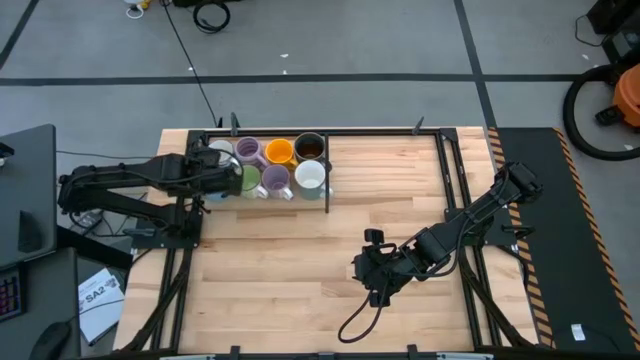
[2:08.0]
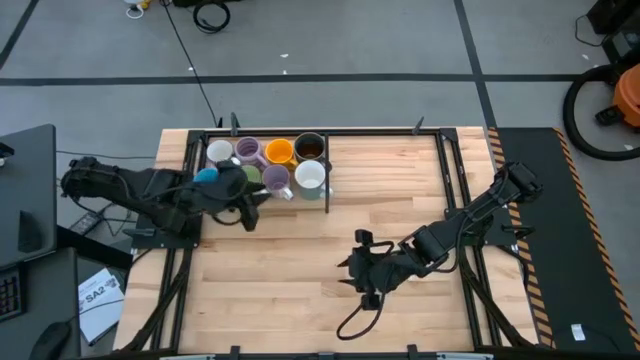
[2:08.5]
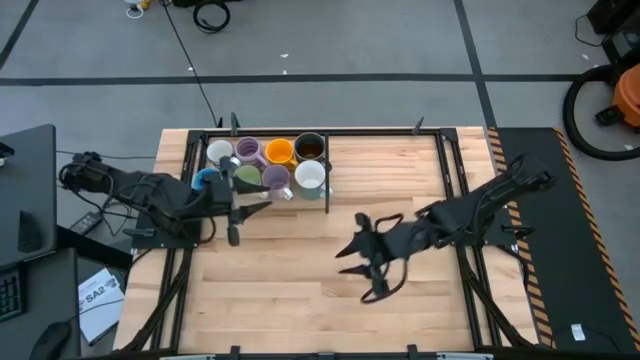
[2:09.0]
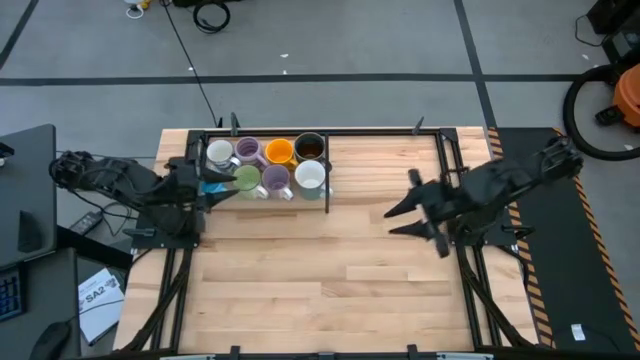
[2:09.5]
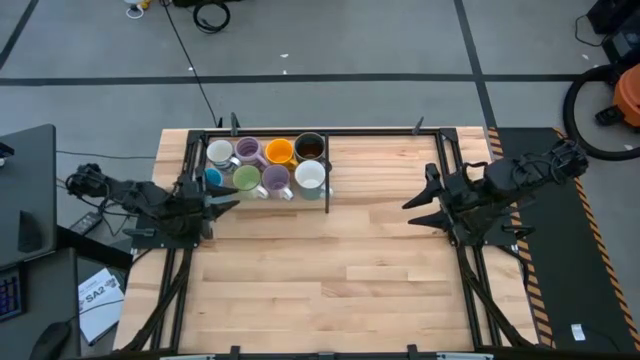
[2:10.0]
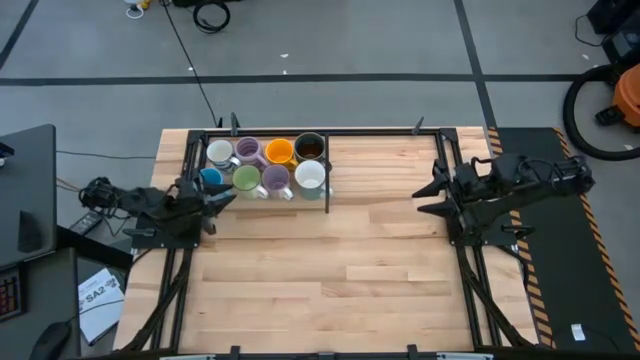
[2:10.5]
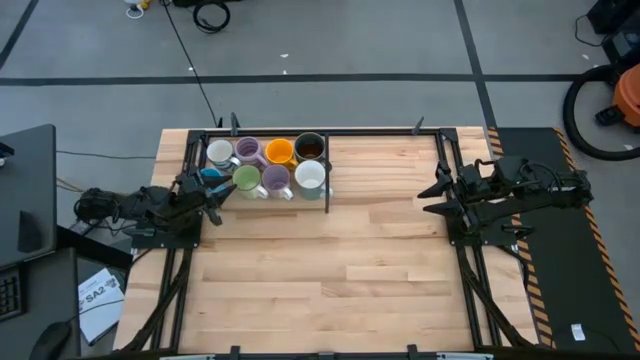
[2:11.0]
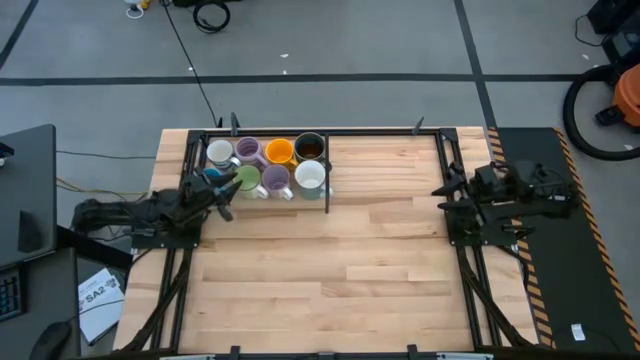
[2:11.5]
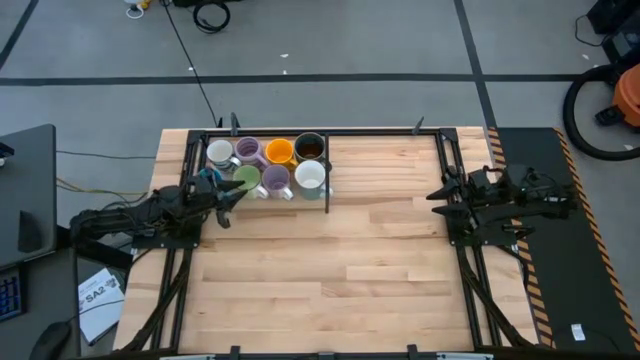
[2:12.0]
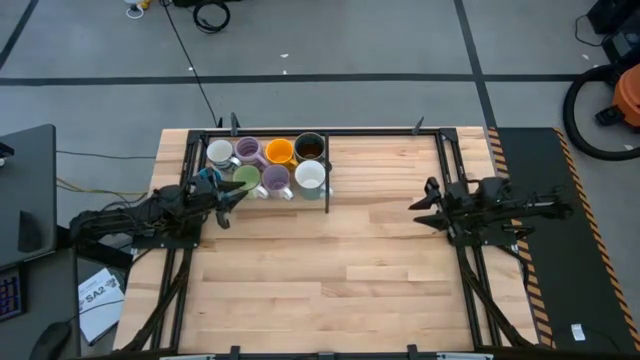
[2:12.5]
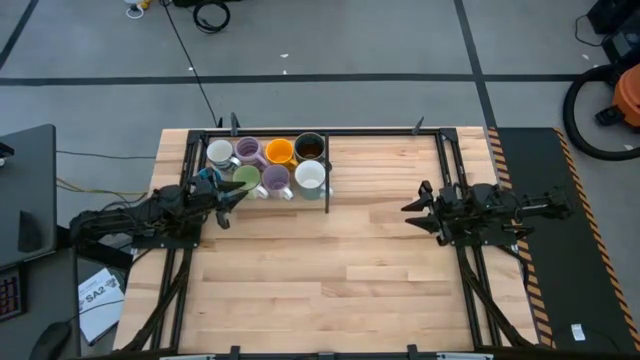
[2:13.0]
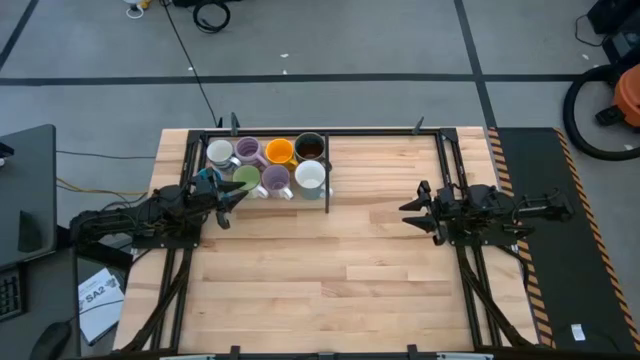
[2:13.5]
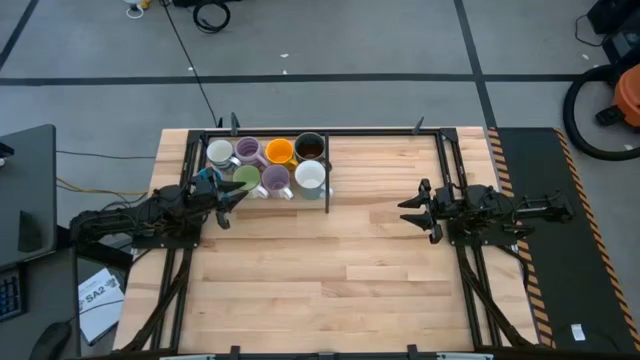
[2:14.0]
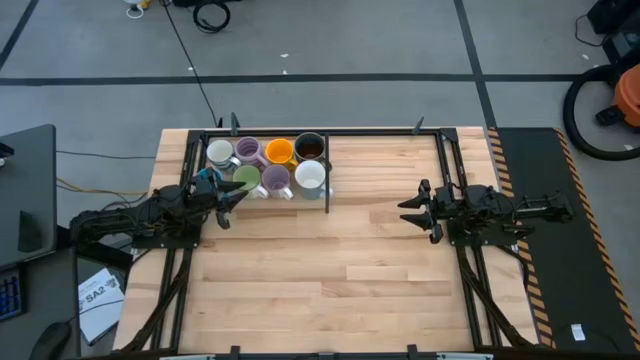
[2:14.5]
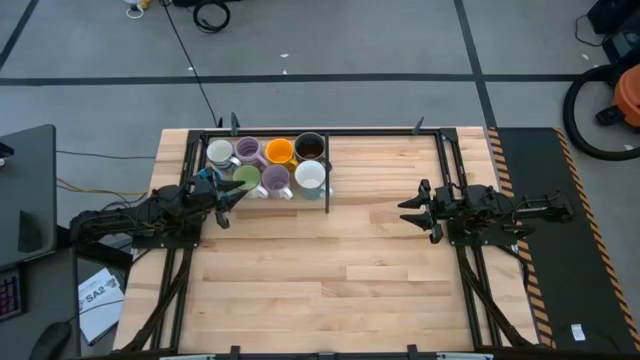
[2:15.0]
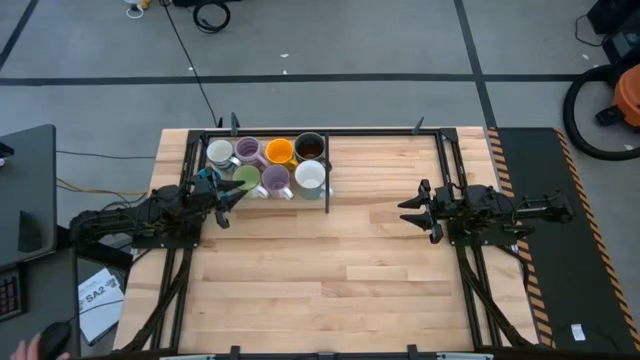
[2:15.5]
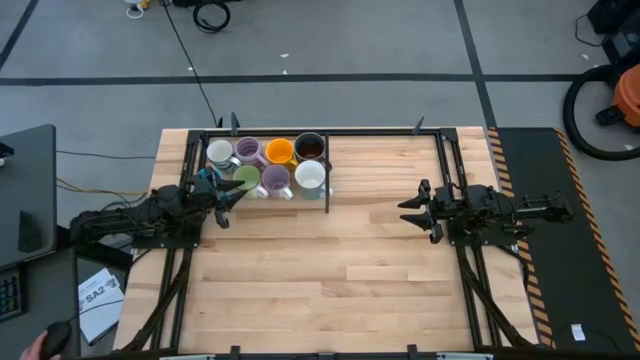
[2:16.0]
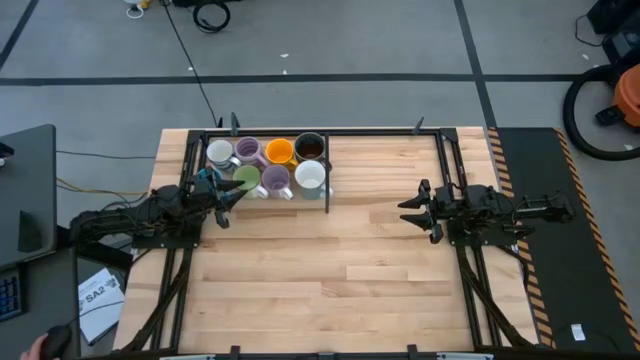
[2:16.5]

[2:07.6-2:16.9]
Task: Place coffee mugs
Return to Home Position

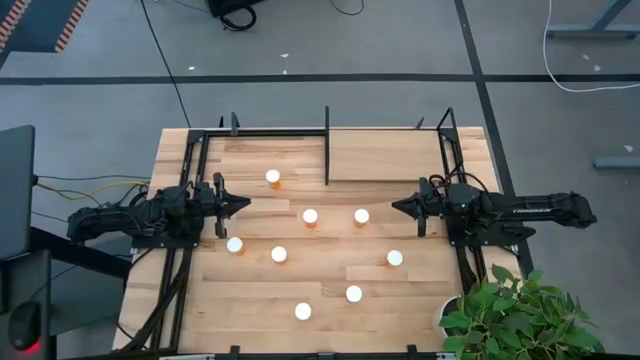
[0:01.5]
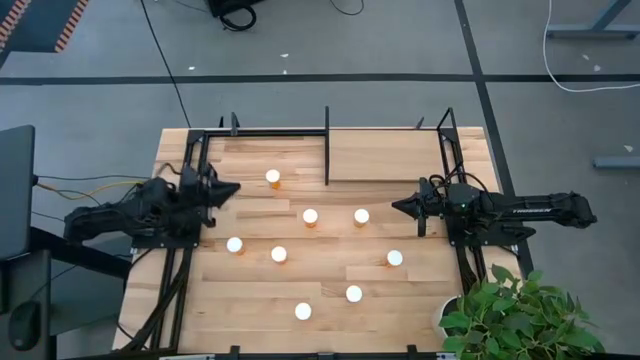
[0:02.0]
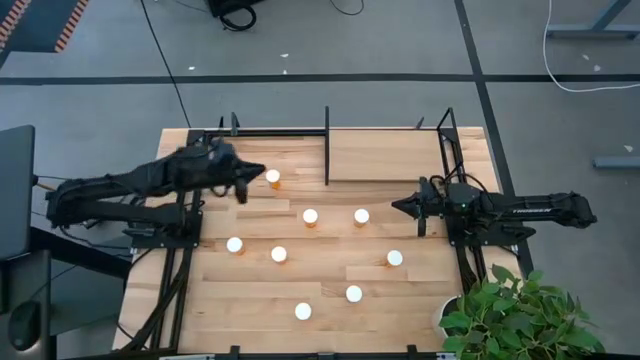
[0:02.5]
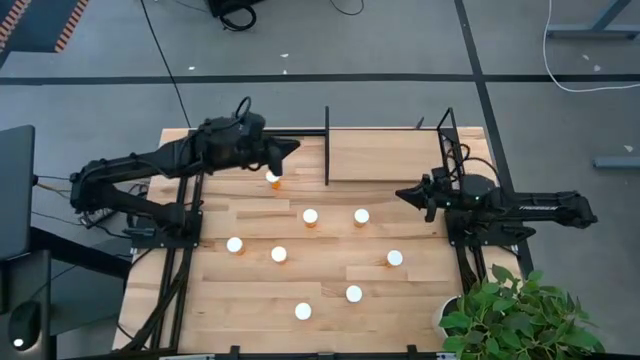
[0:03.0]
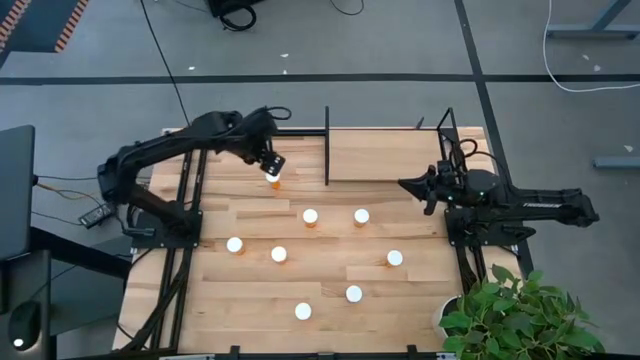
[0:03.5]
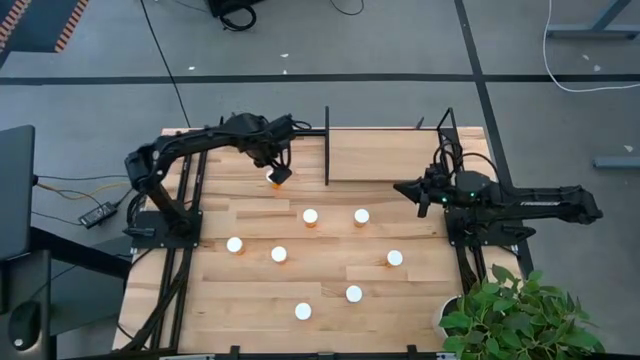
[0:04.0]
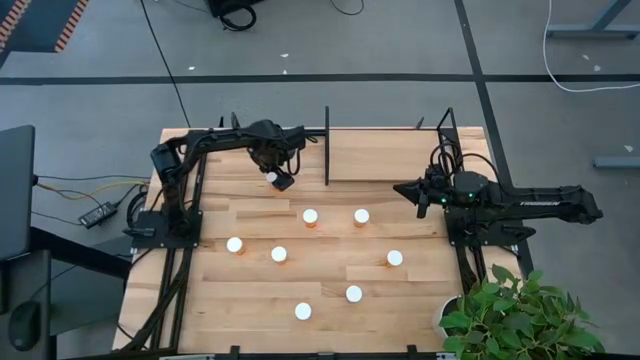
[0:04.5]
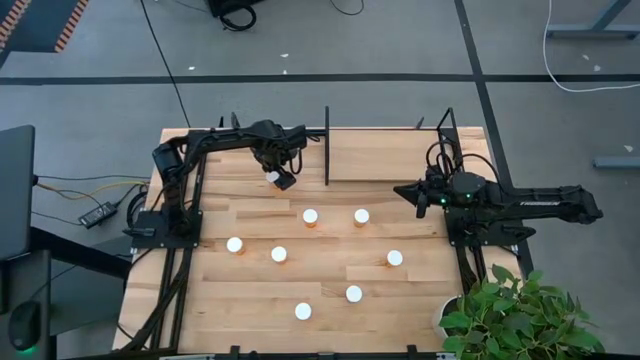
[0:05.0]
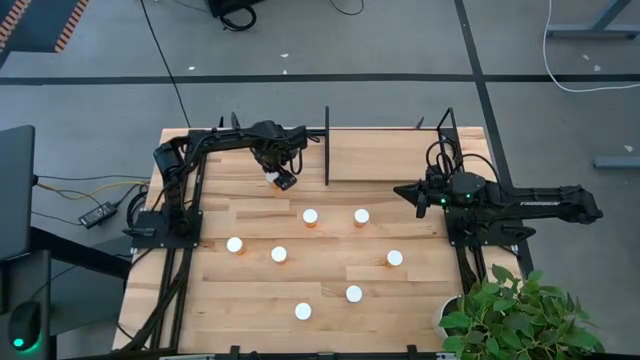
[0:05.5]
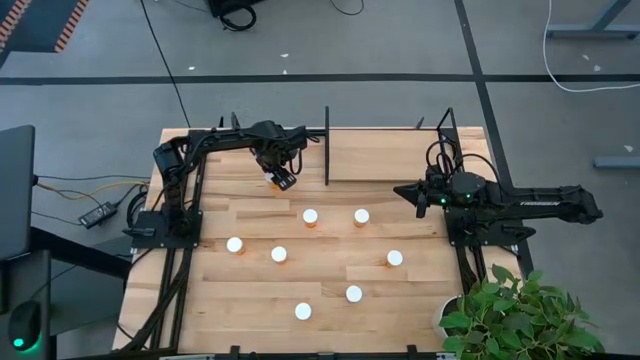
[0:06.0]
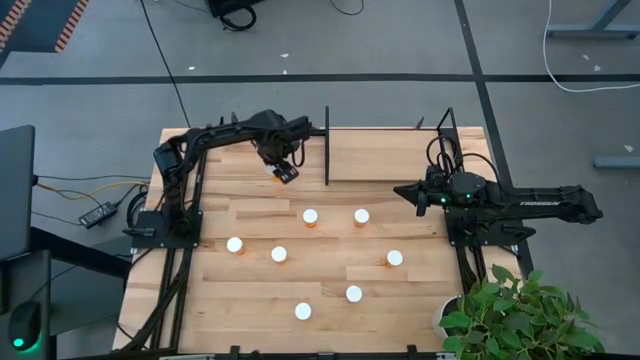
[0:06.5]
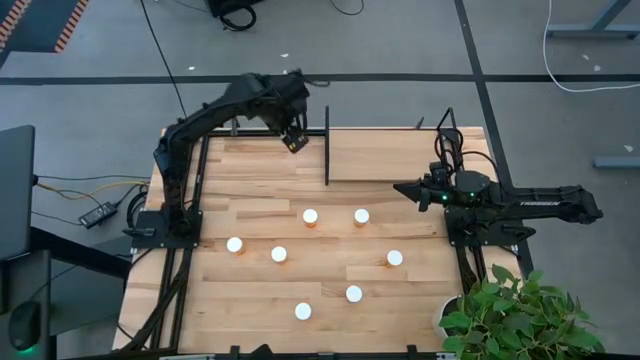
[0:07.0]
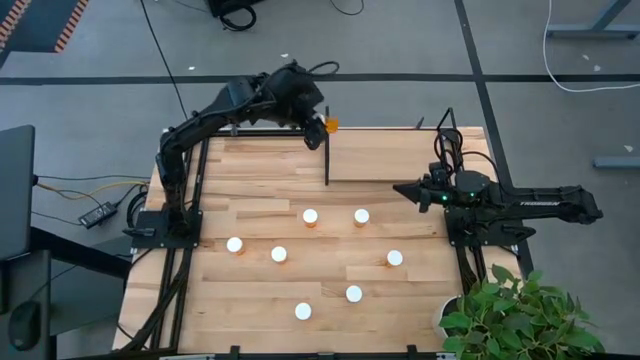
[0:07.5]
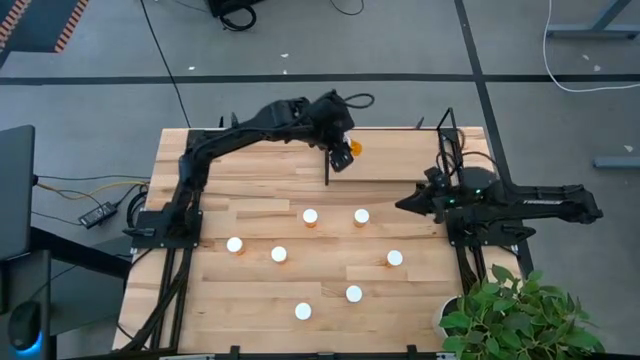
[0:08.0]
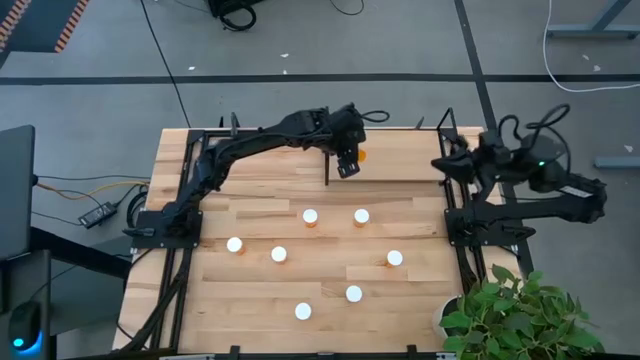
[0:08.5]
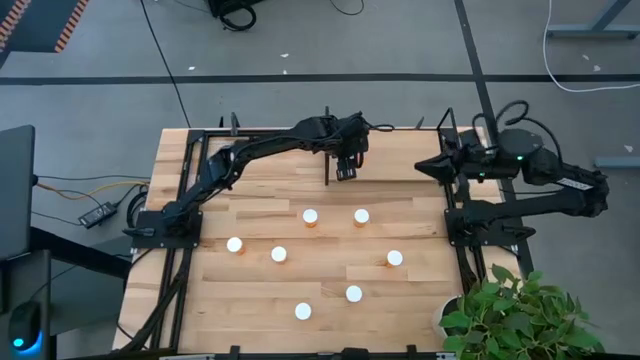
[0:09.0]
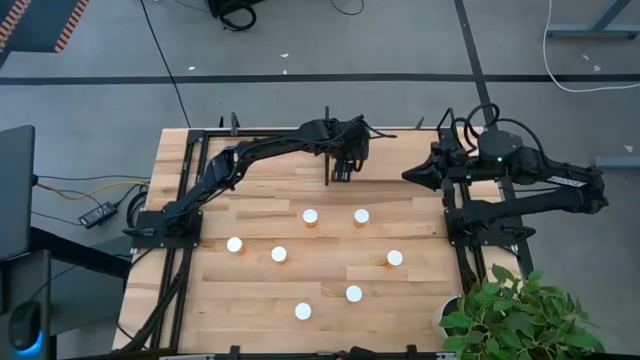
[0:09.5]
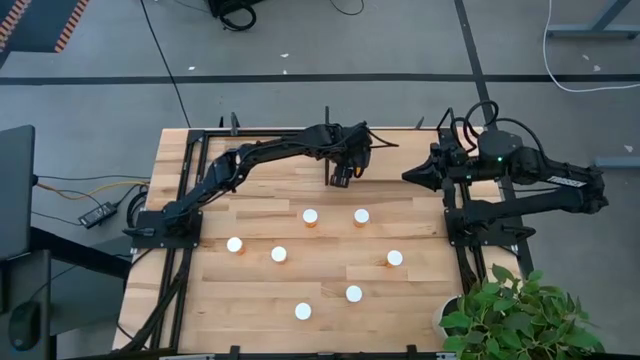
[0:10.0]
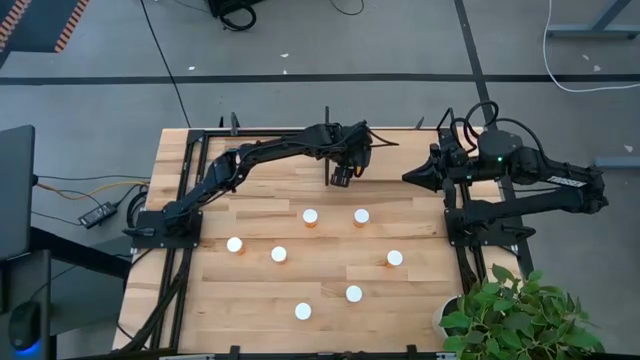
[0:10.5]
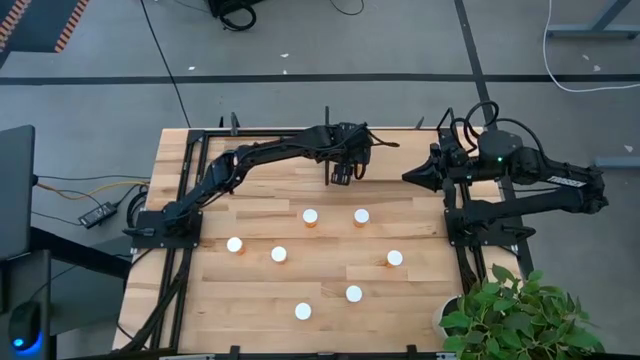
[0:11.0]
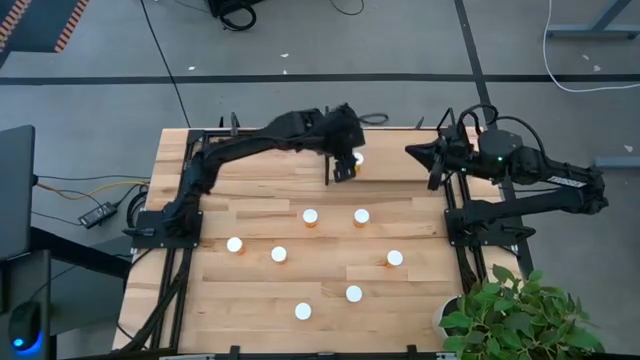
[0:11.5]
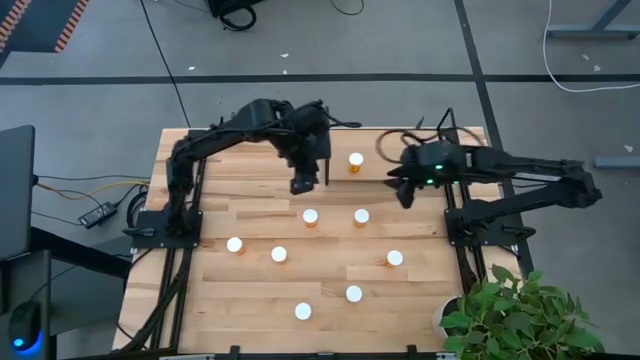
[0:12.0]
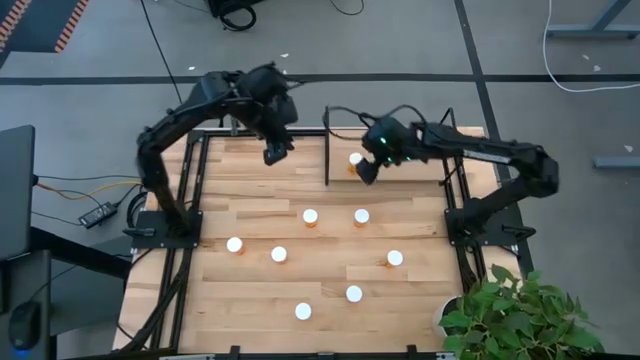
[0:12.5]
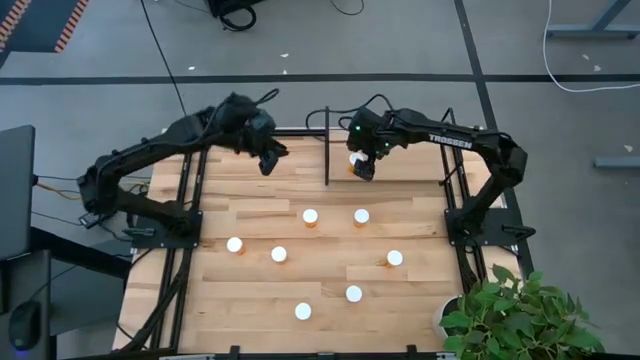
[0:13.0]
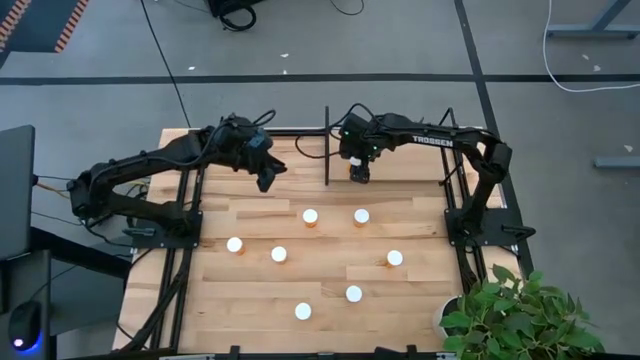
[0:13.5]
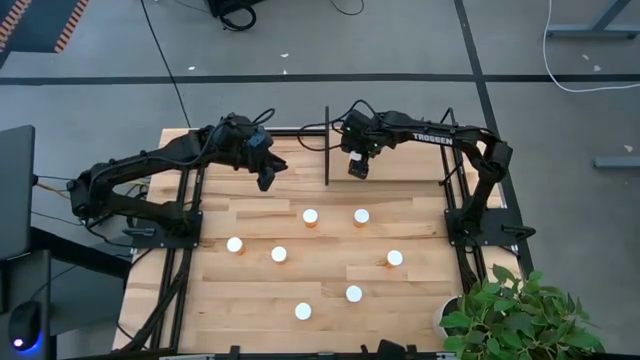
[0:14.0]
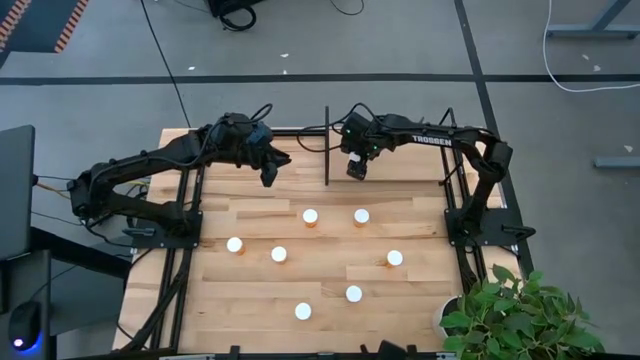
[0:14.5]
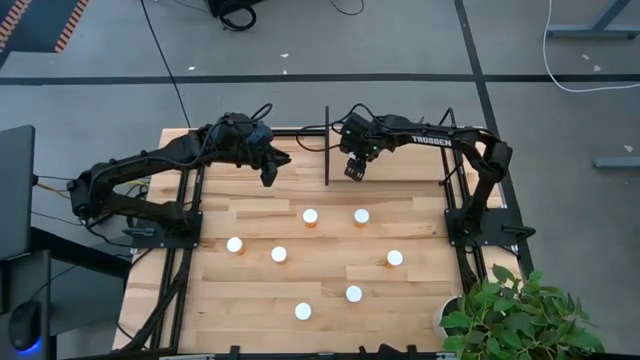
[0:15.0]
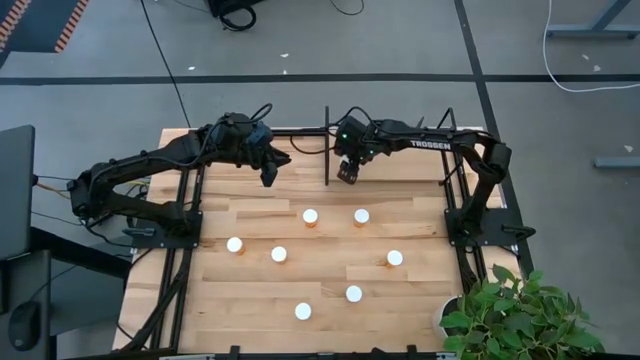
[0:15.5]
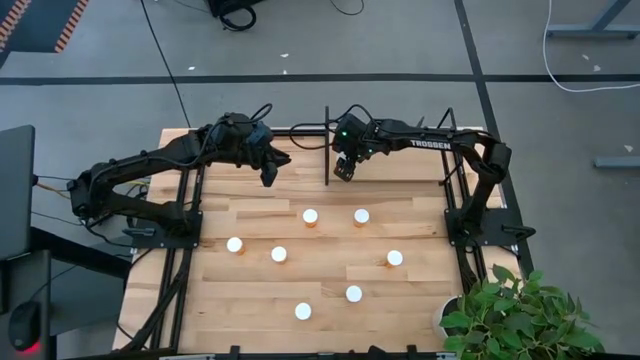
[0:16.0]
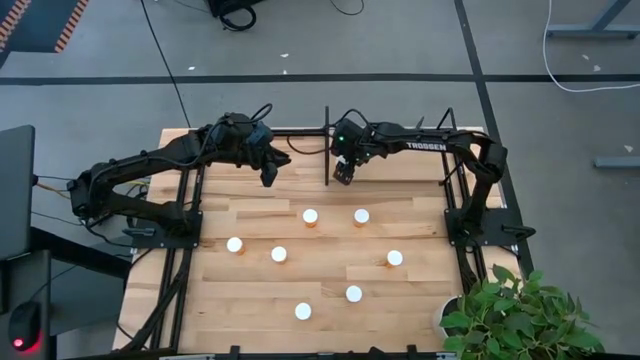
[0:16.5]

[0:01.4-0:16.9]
Task: Pick and place medicine bottles onto shelf by color
Put the orange pill bottle on the shelf
